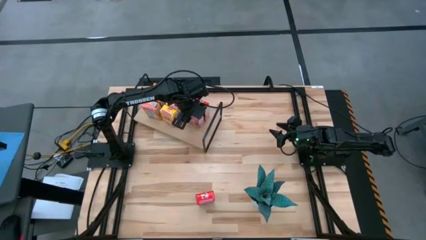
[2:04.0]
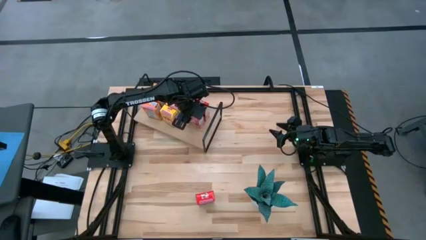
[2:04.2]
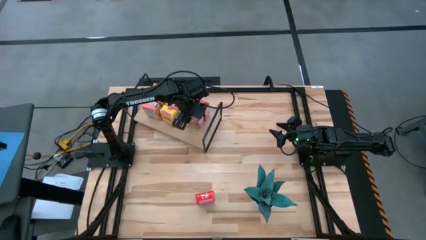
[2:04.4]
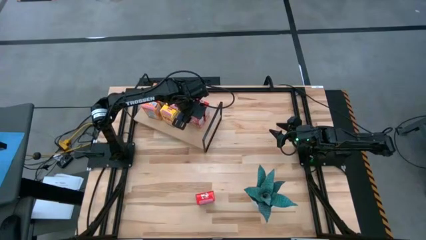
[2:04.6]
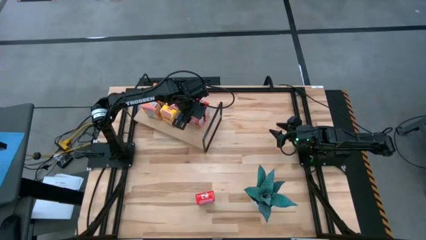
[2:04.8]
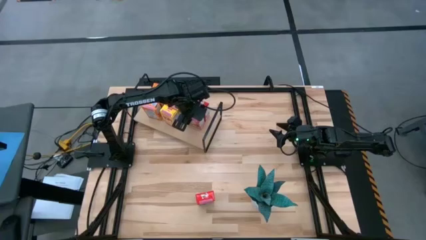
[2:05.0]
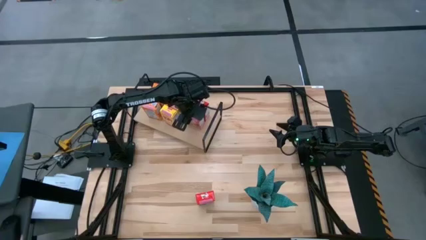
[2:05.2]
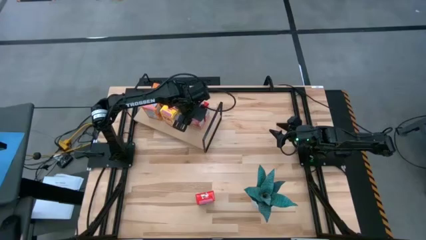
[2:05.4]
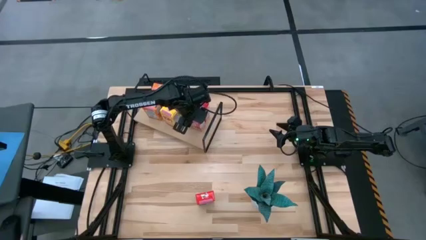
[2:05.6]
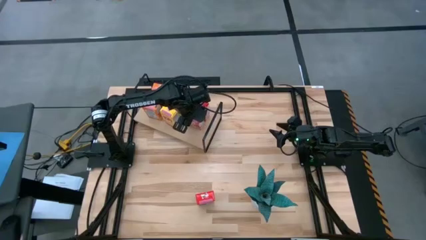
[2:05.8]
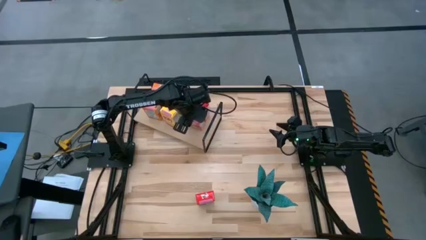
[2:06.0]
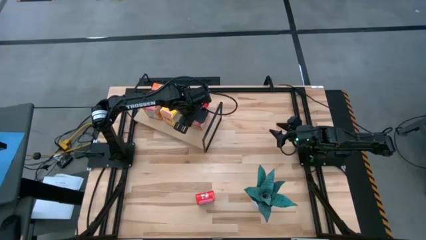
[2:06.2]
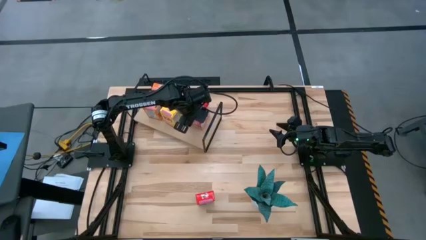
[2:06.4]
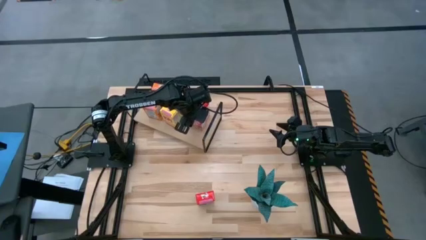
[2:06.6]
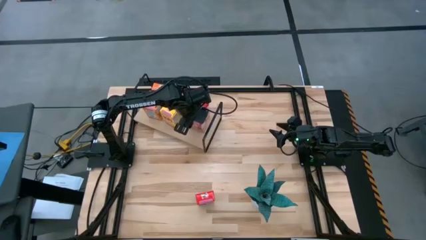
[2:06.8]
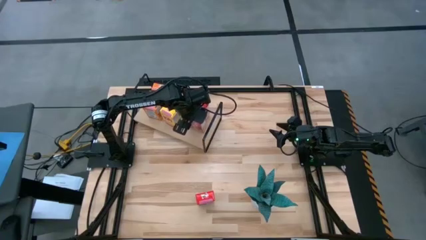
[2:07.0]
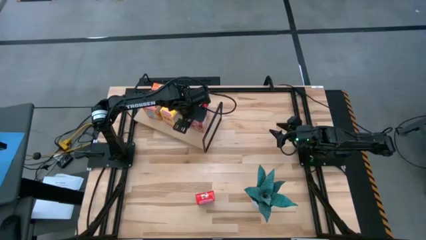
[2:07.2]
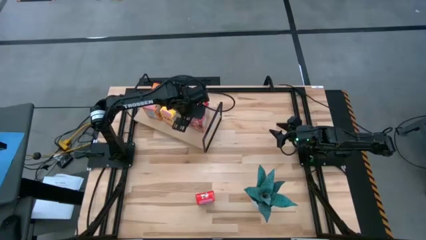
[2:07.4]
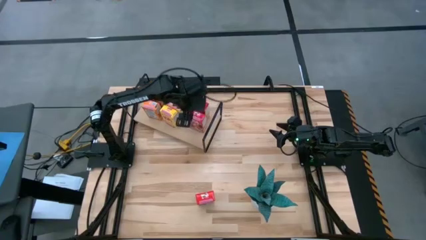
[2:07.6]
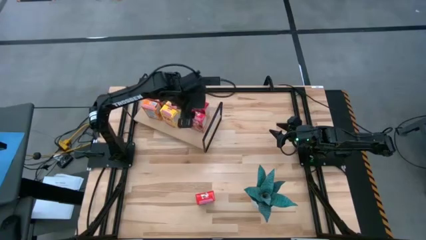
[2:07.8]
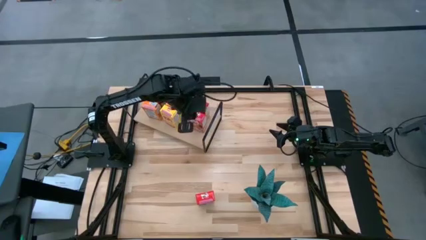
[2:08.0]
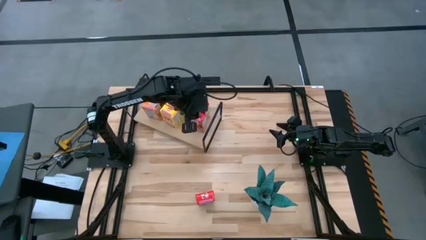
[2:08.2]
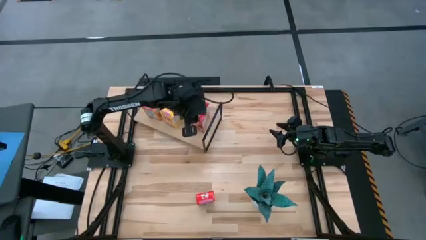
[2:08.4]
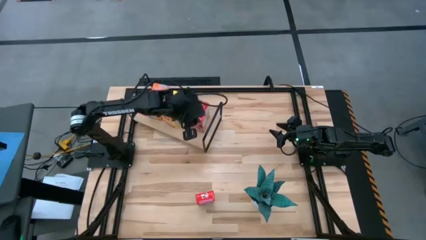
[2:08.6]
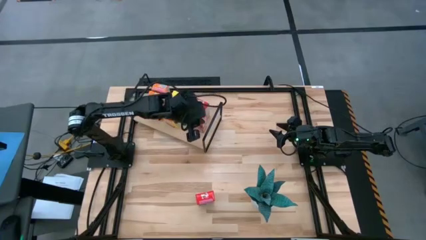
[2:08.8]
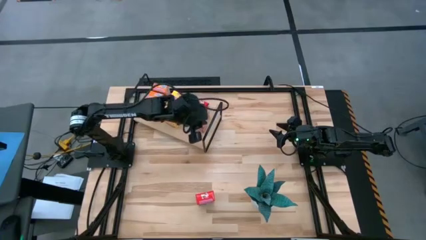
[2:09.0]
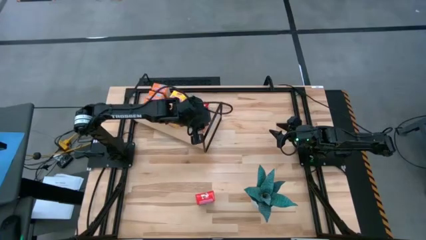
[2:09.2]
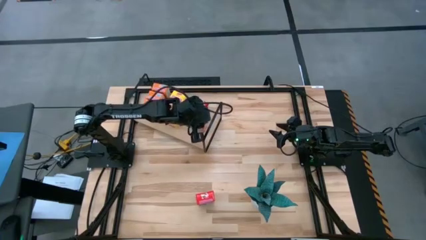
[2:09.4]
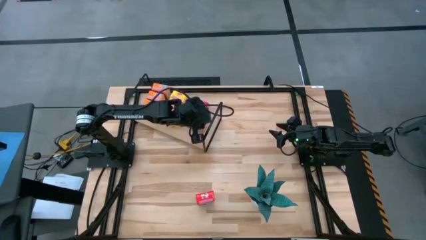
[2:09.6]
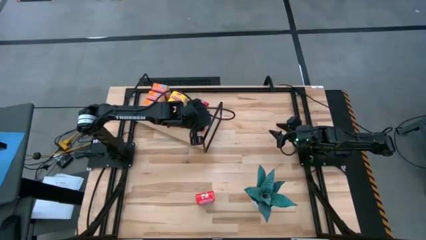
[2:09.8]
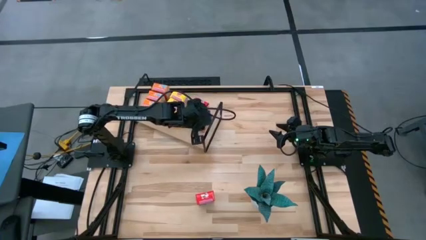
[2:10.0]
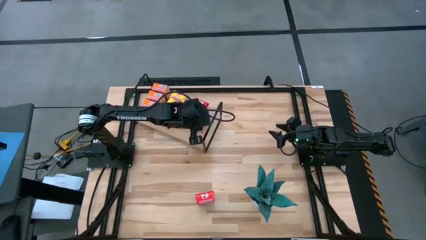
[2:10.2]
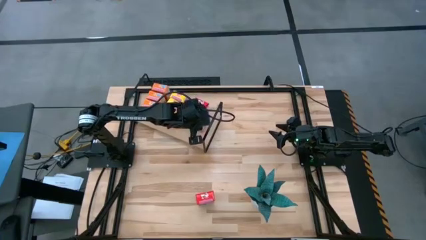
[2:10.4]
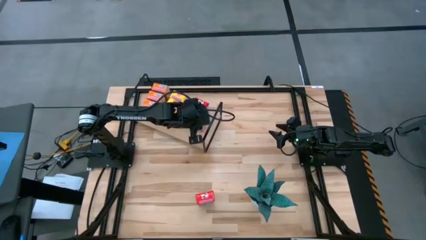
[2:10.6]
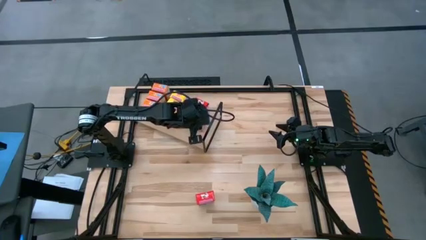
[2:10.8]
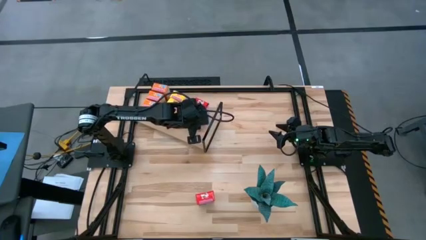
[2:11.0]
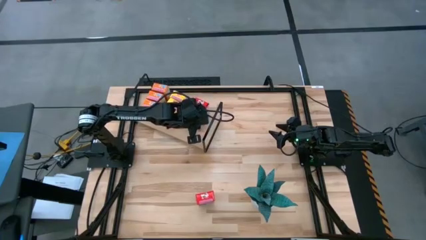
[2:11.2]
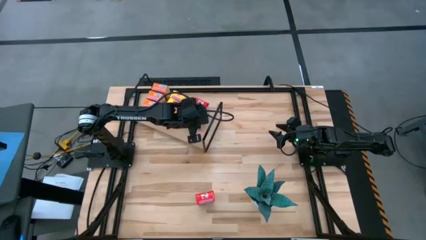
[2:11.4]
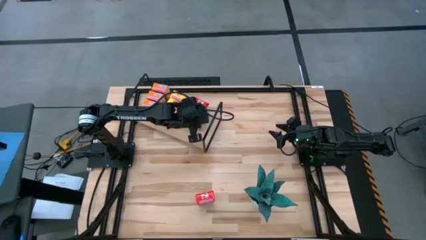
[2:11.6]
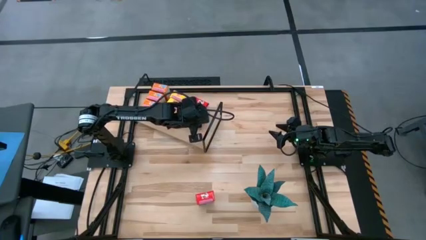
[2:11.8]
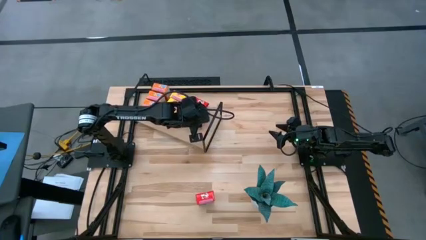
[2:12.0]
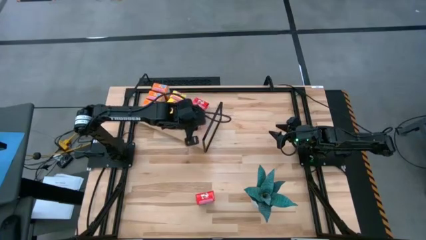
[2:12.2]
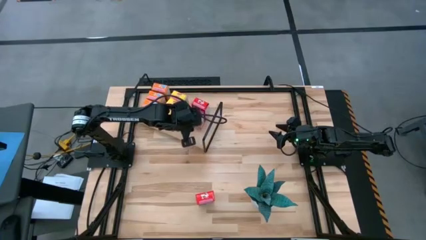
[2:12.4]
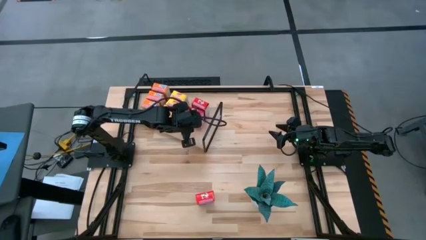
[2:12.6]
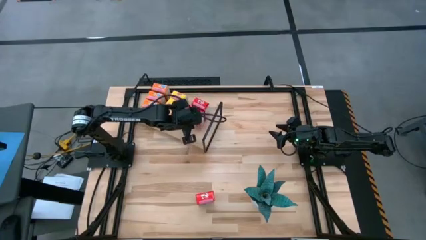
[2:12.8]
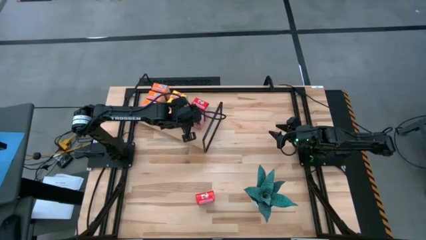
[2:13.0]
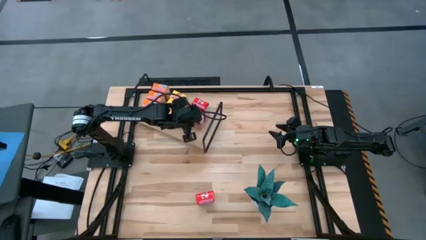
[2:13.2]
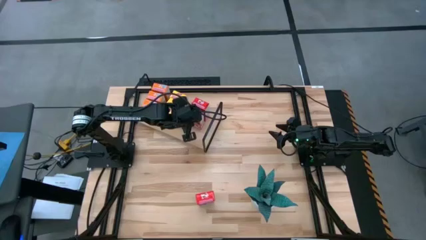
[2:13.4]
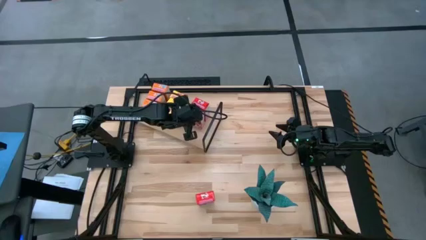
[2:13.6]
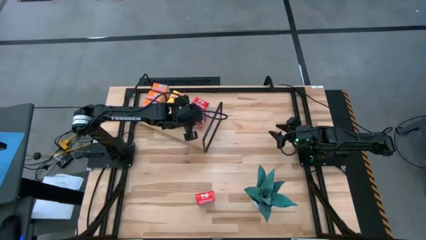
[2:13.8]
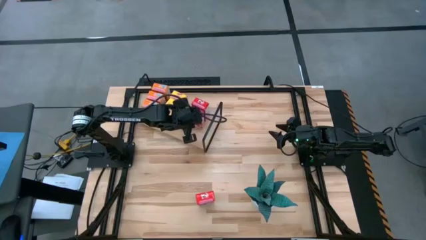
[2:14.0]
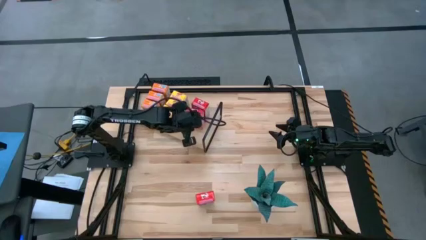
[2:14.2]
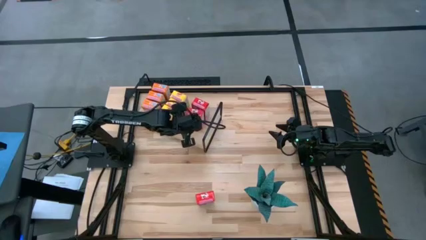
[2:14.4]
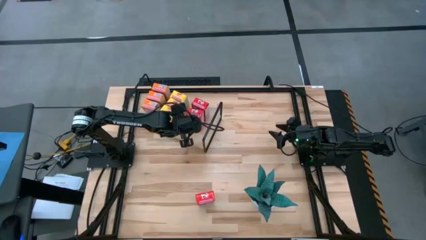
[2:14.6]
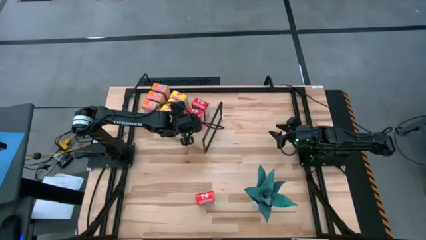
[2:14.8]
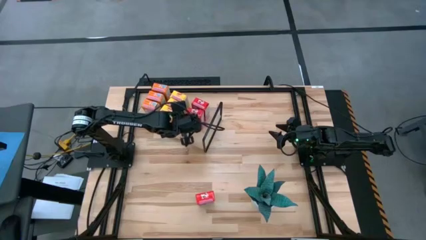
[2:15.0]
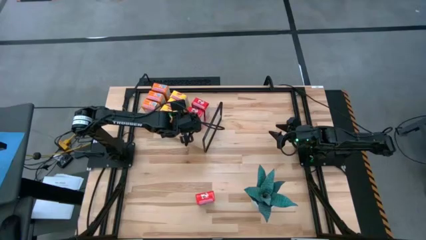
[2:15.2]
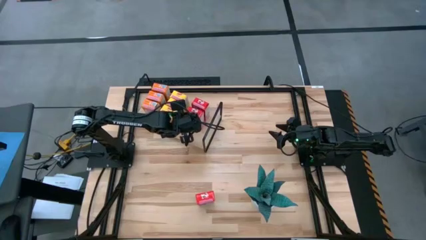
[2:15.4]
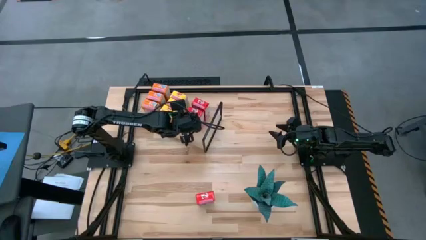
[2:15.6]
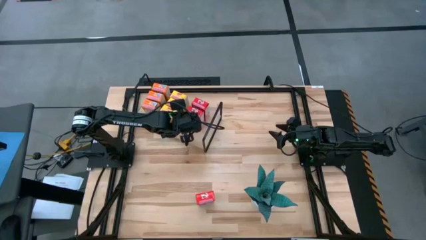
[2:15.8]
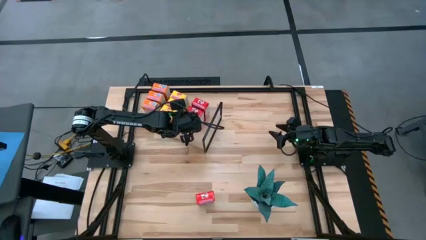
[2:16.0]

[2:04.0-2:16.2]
Task: Stack cereal on shelf
Put the left red cereal box aligned with the other red cereal box on the shelf
